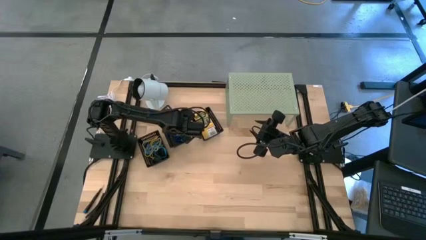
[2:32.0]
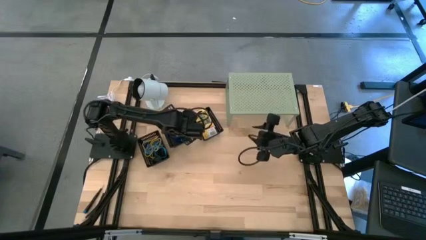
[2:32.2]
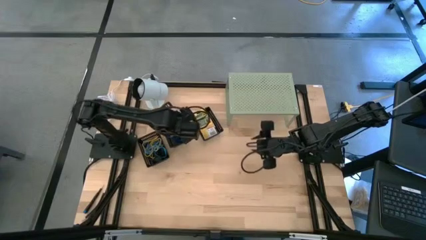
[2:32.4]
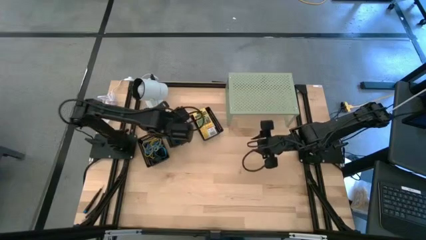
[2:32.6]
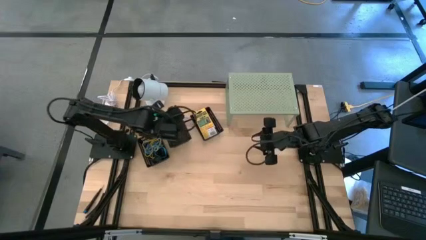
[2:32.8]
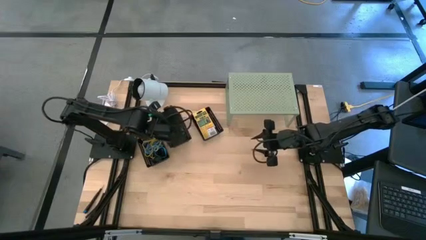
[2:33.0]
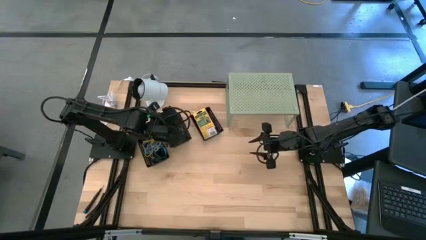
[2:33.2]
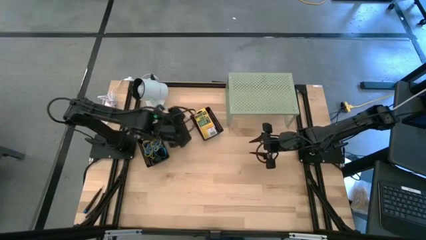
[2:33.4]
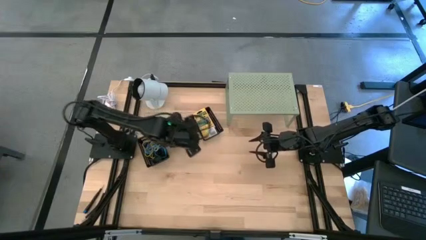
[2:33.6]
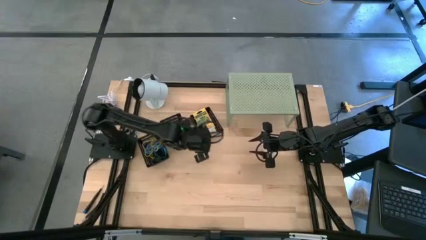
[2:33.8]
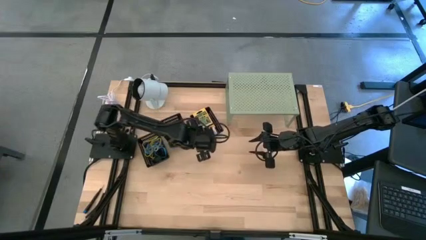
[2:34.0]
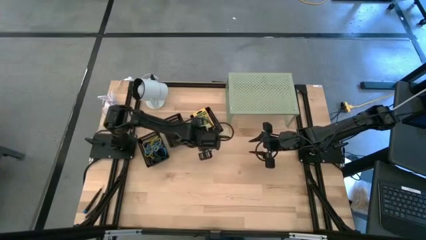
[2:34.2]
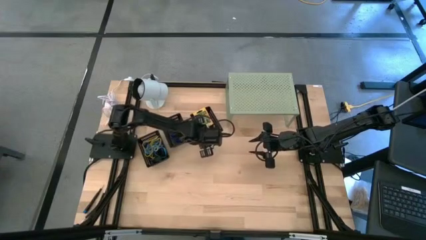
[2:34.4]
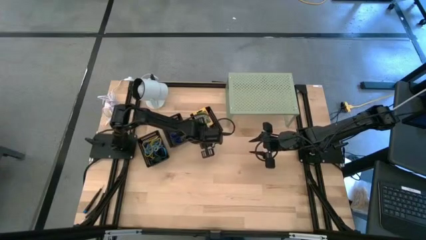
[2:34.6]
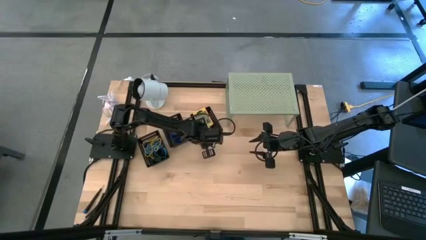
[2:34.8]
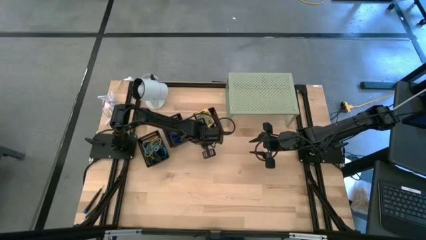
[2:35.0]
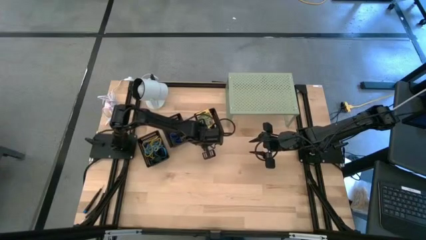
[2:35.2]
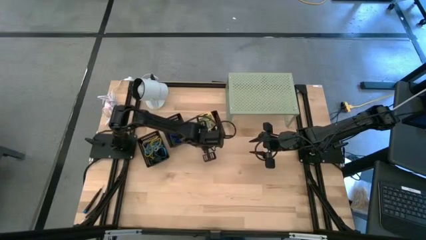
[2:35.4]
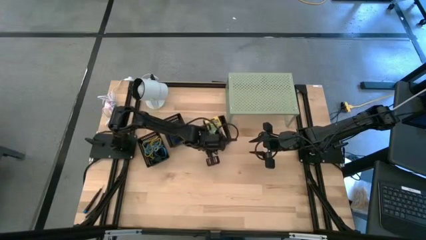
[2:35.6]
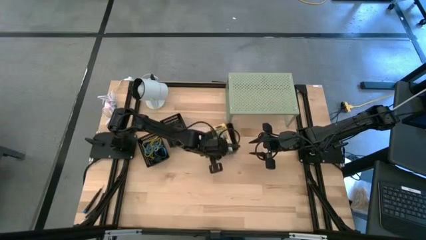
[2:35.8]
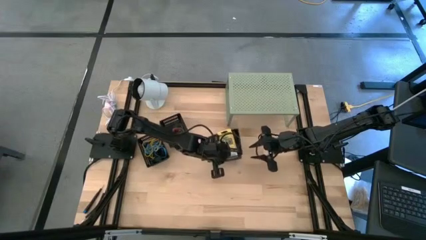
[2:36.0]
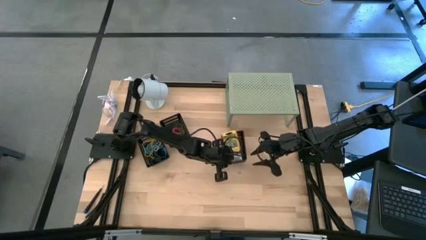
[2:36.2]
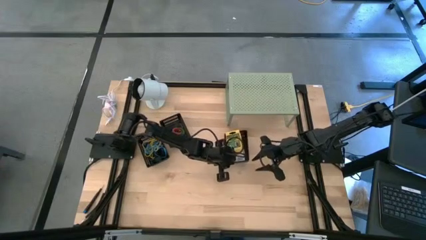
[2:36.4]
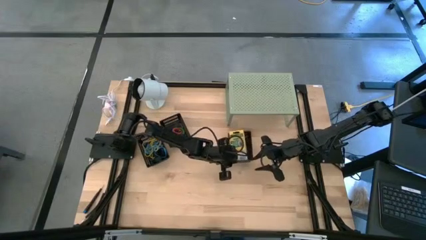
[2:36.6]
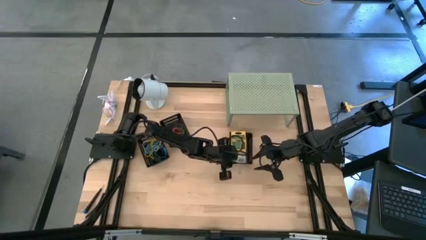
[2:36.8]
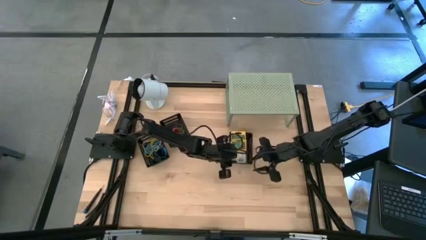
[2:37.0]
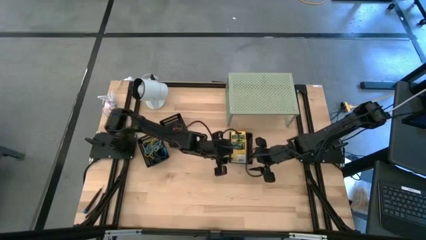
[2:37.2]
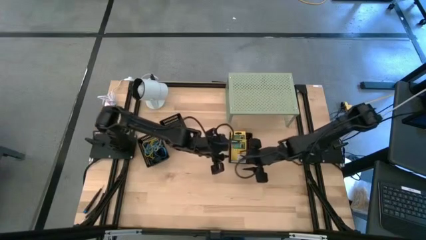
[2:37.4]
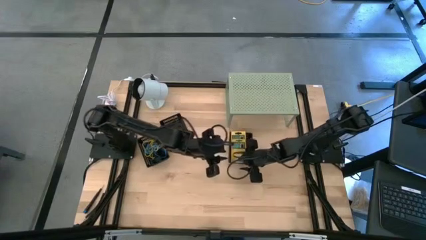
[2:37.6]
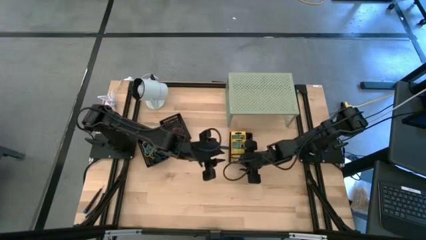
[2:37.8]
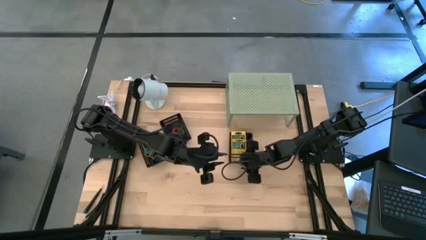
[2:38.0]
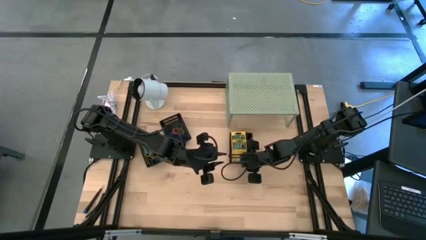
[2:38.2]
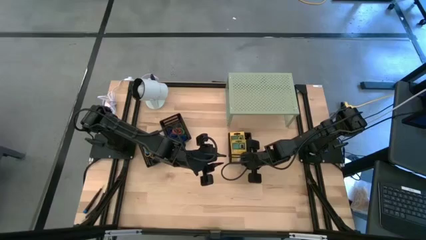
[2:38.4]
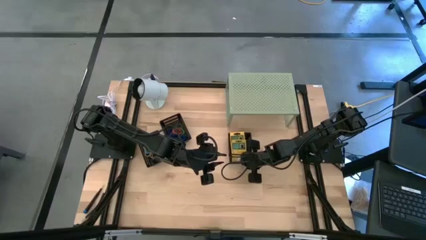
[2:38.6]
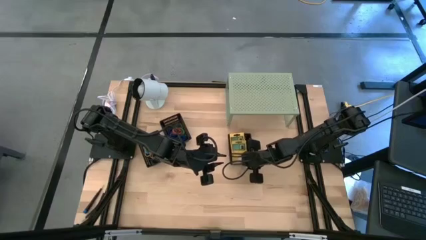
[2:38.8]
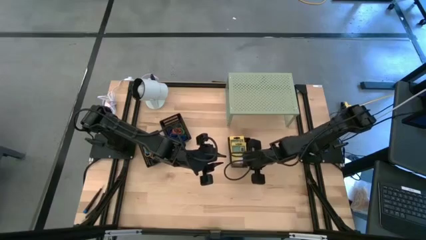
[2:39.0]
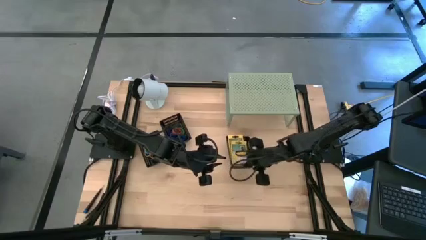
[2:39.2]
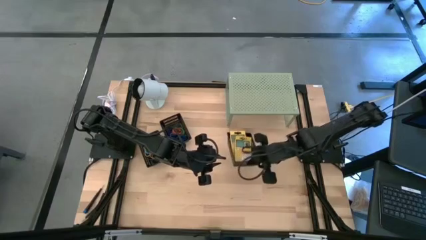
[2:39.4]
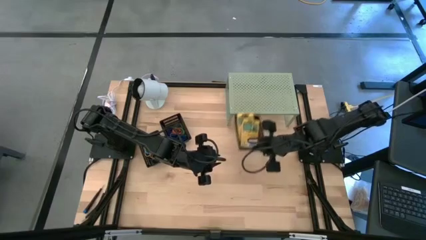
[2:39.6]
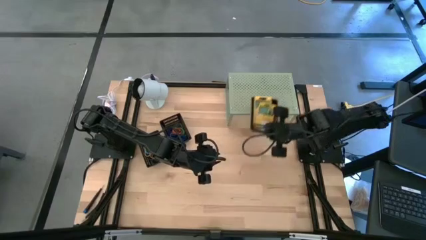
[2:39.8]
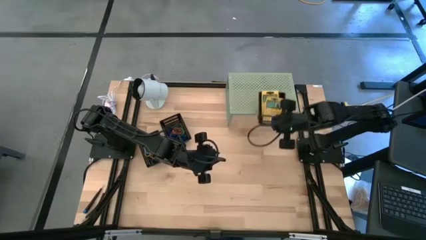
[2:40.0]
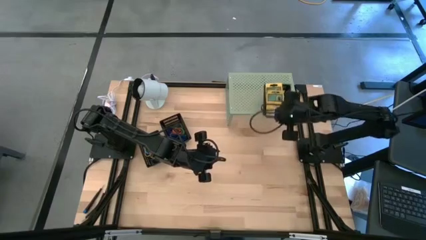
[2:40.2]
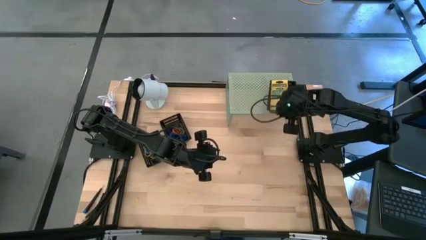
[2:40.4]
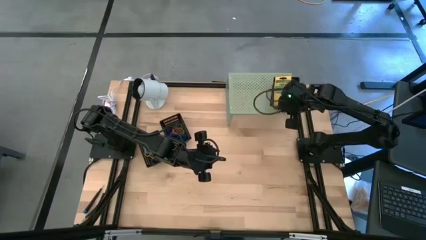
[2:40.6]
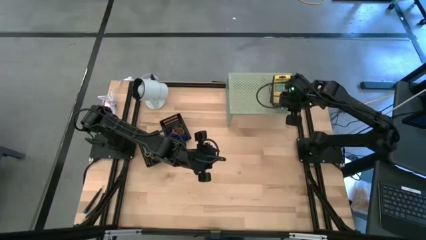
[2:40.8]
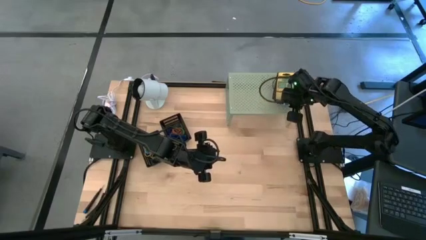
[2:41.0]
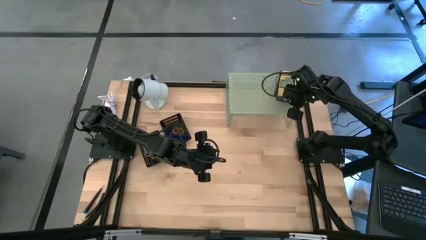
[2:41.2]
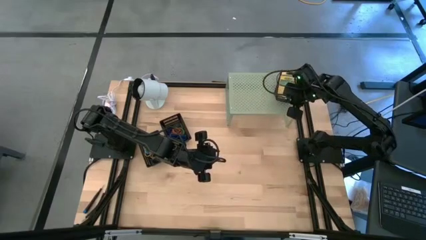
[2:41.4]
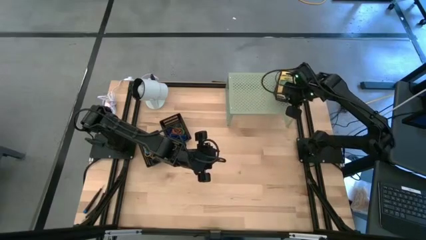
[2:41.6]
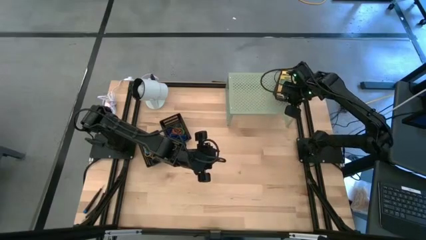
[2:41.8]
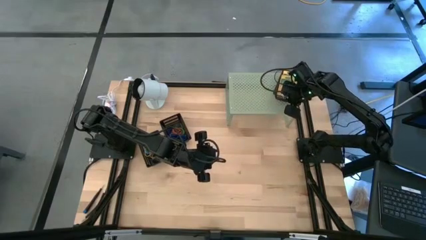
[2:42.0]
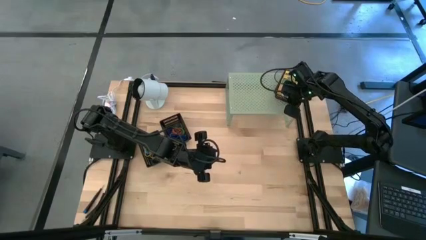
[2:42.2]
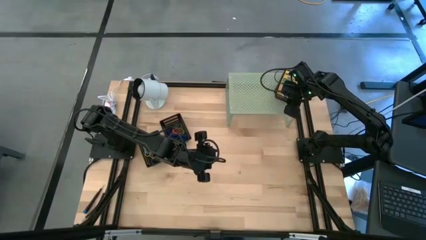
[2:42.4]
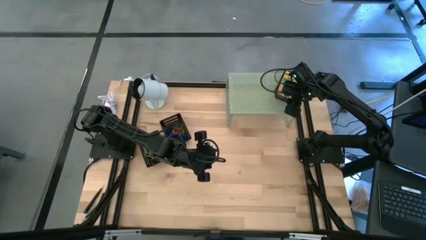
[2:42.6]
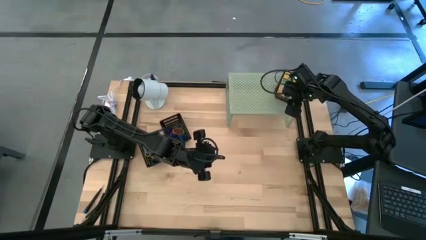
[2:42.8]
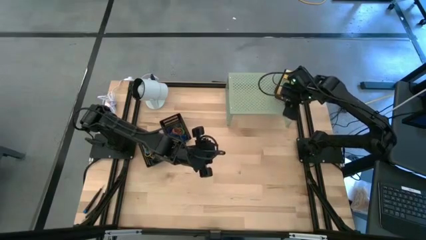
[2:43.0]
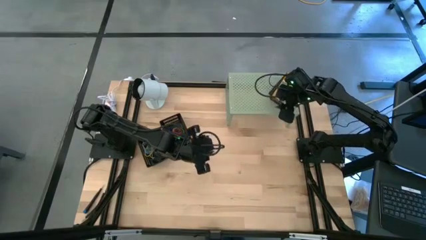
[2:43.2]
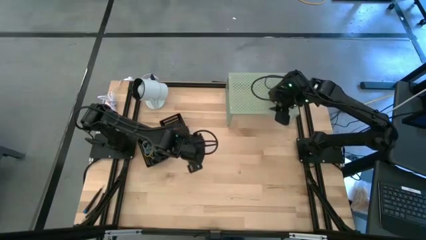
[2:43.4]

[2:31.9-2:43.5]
Task: Pick & Place Office Desk Supplies
Put the right black basket on the shelf
